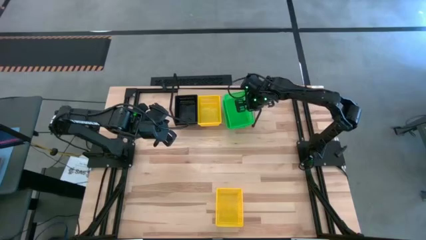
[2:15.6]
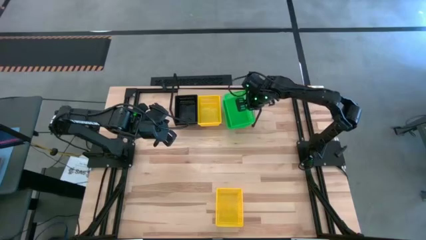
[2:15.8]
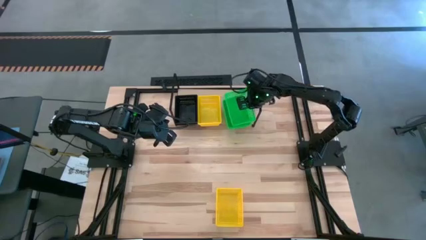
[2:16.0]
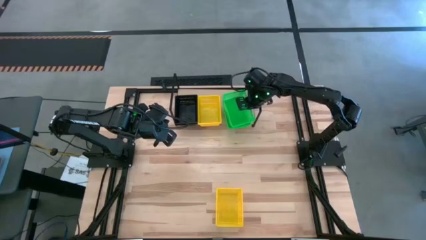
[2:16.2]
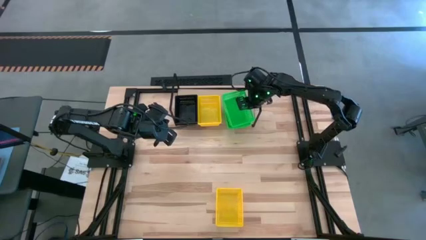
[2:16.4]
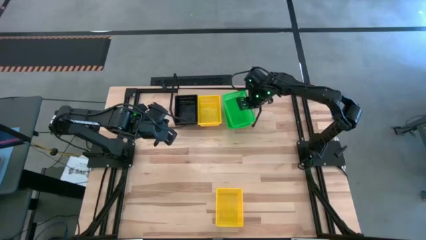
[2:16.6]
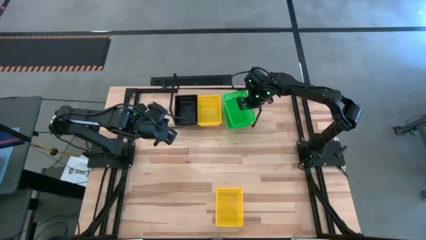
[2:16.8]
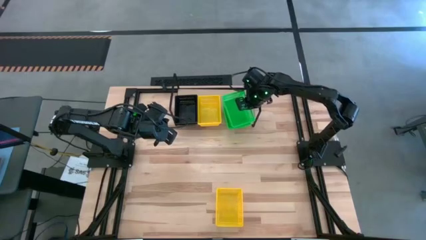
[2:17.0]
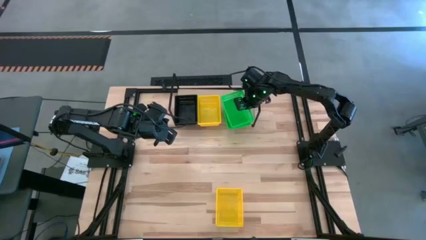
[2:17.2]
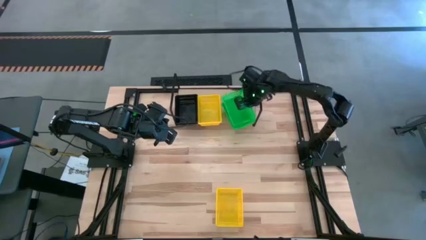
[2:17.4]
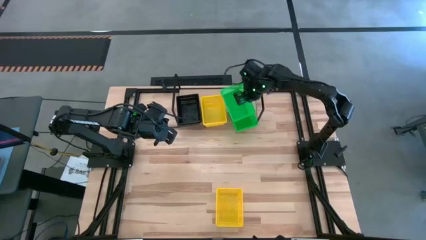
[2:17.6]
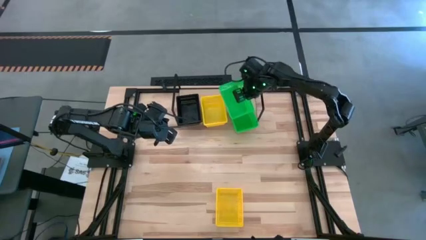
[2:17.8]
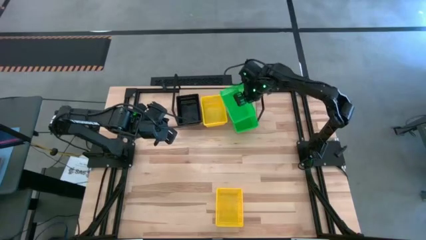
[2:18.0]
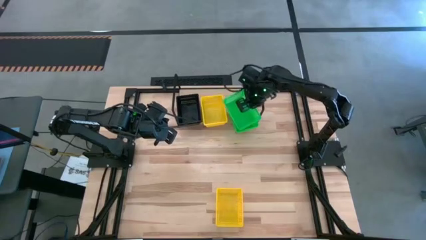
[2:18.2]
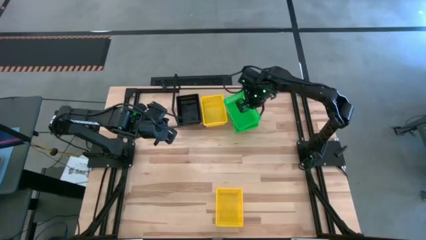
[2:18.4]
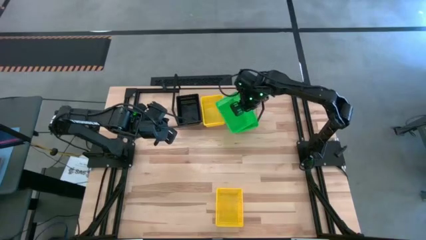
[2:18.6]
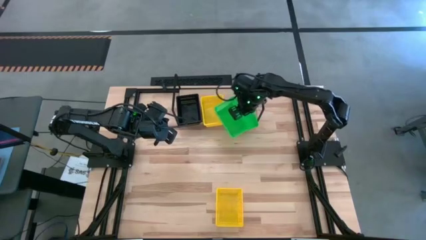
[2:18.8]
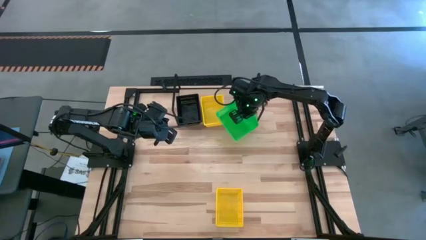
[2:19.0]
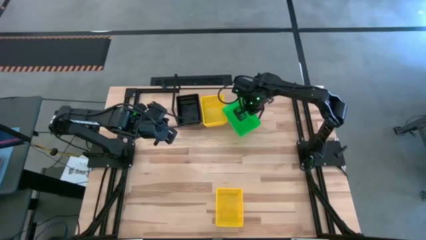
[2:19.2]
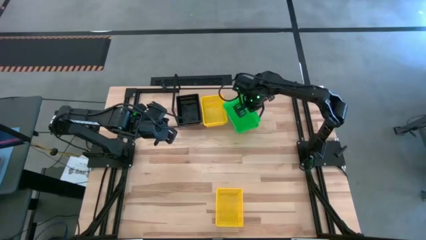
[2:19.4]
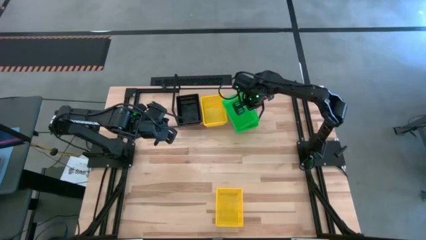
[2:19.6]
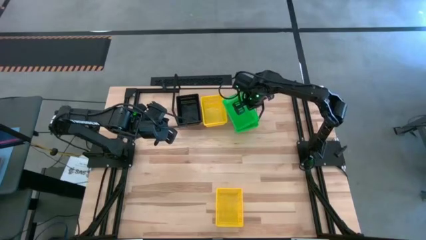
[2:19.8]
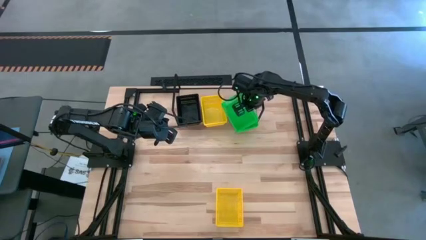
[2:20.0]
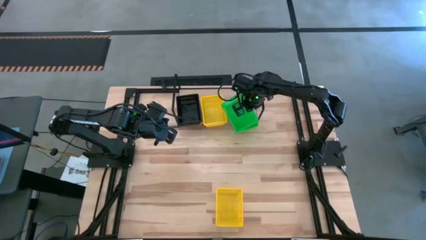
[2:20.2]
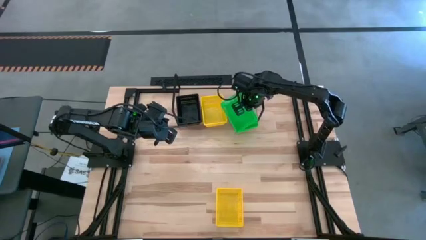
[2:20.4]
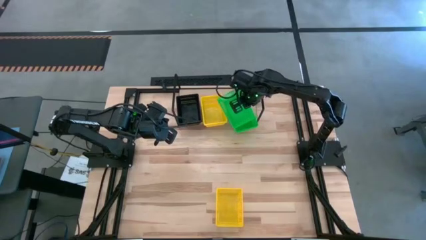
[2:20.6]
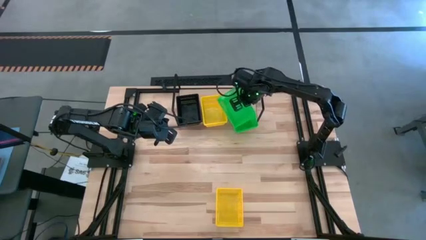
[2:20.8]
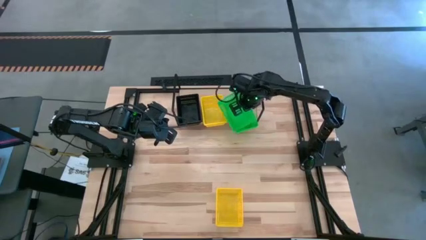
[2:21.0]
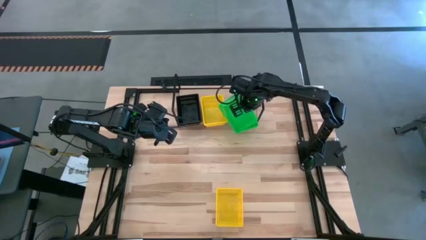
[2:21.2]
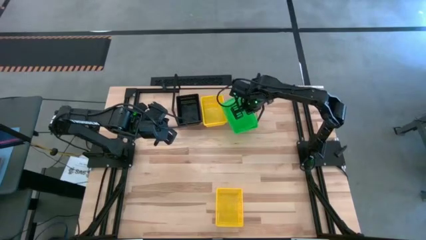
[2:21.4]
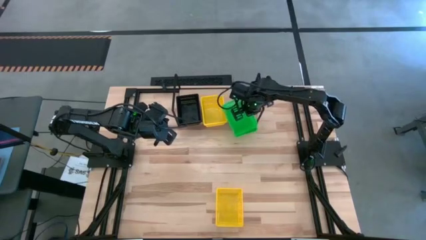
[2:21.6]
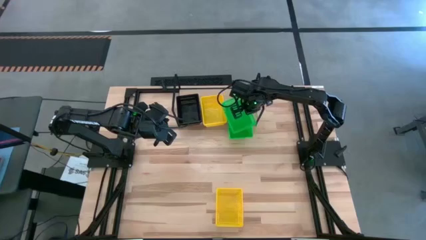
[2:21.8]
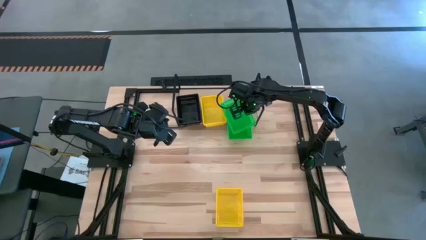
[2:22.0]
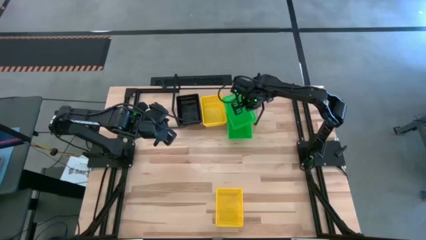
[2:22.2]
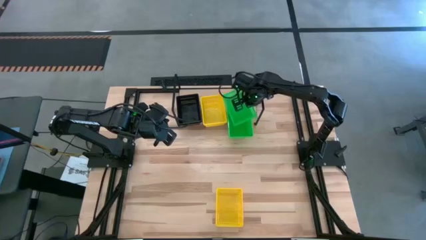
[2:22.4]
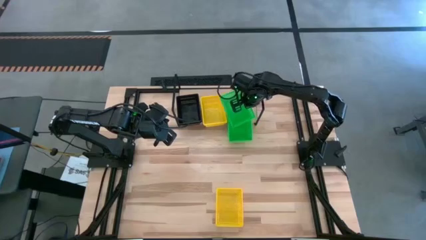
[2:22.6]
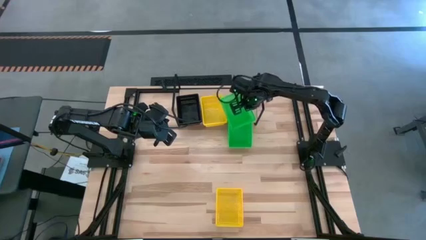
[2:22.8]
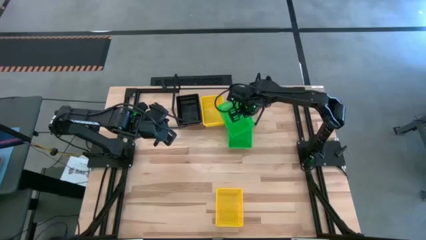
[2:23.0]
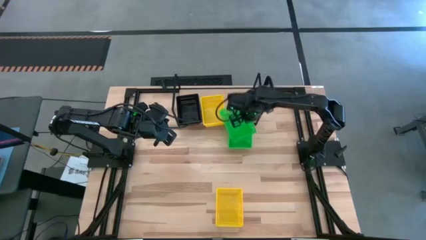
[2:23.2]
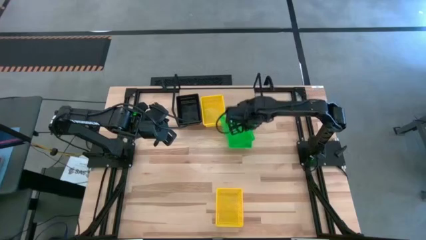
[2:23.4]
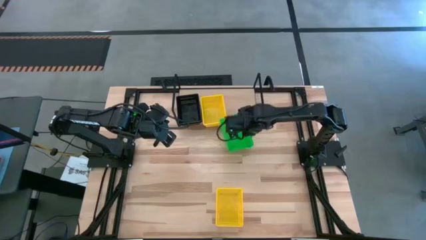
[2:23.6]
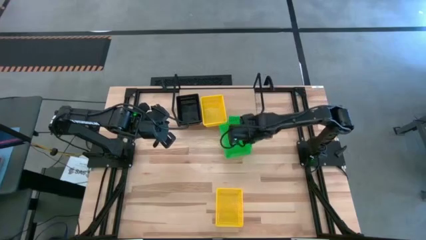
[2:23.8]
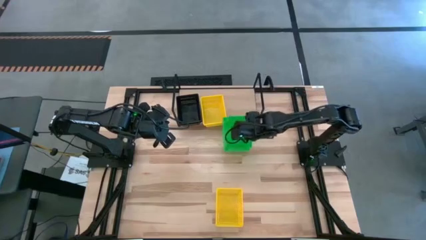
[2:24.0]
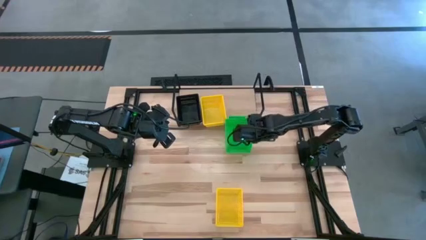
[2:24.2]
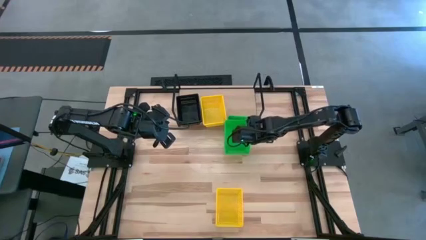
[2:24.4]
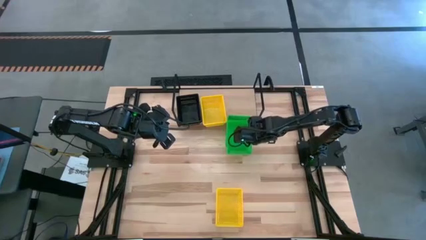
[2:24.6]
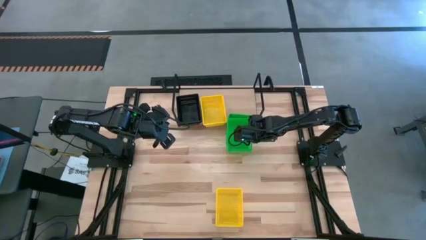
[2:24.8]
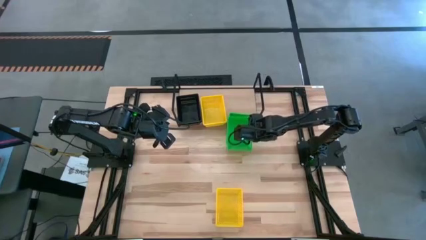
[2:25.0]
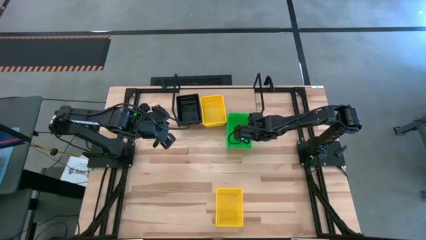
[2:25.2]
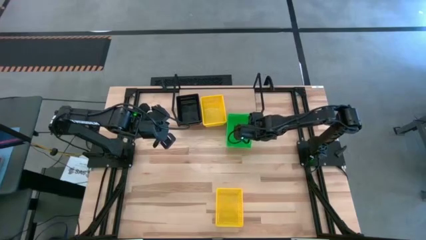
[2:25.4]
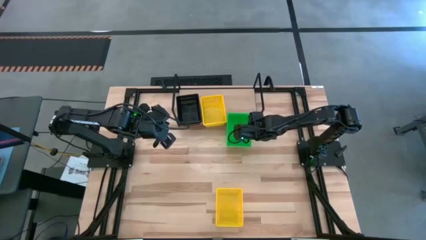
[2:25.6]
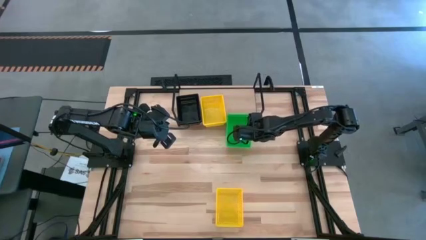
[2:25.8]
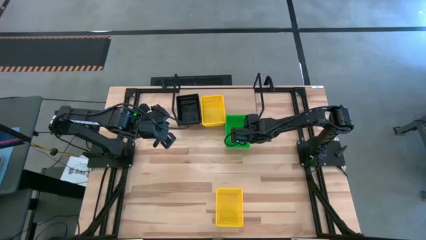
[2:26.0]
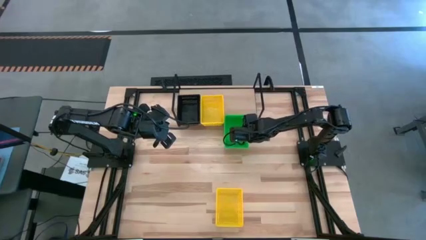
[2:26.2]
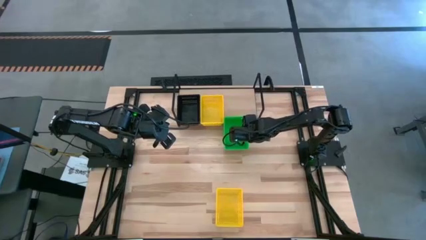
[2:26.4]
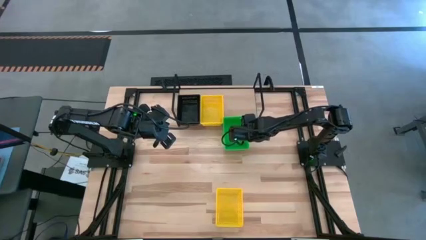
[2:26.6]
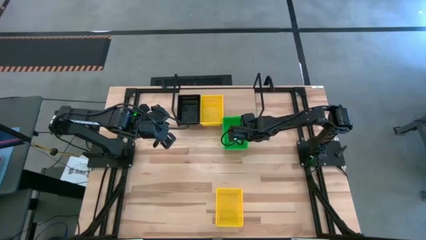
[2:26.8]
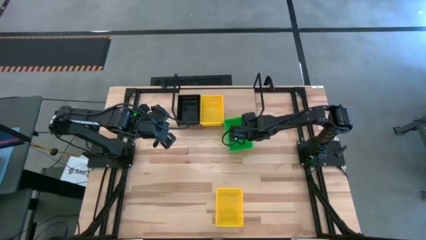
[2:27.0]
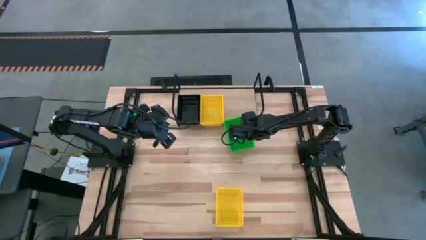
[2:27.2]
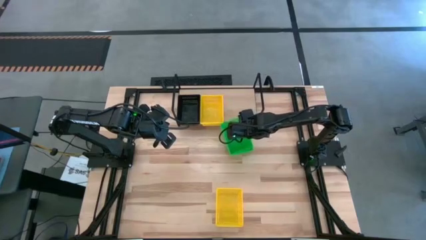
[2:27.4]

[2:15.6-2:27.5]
Task: Stack baskets on shelf by color
Stack the green bin on top of the stacked green bins on the shelf
